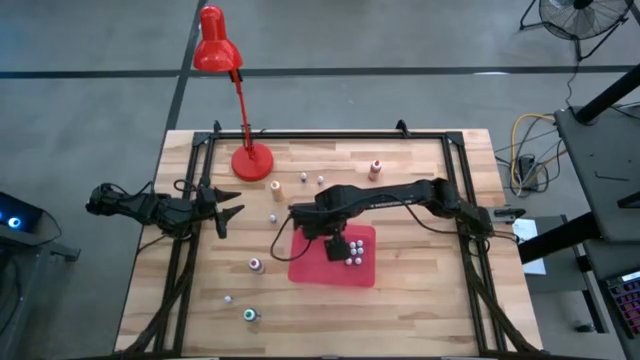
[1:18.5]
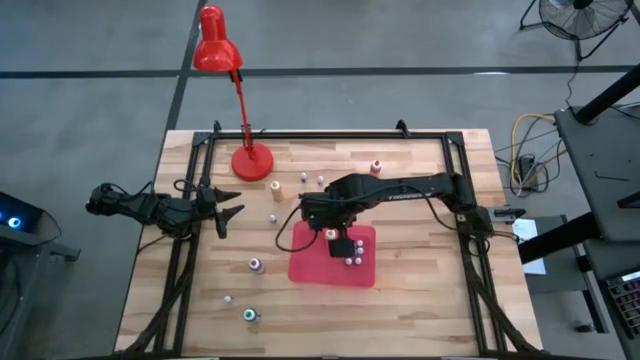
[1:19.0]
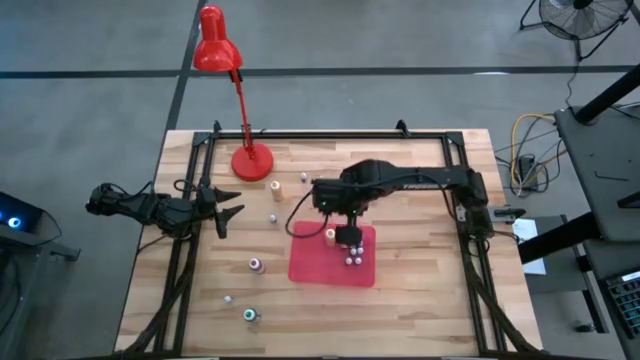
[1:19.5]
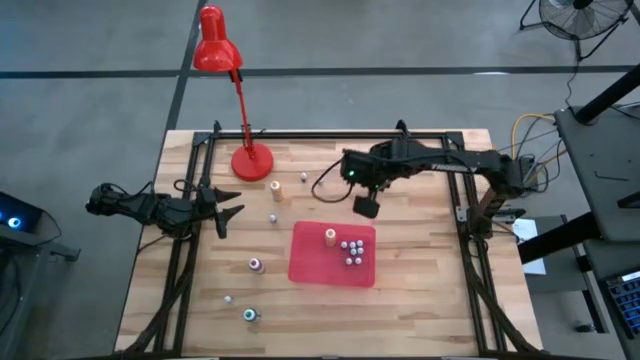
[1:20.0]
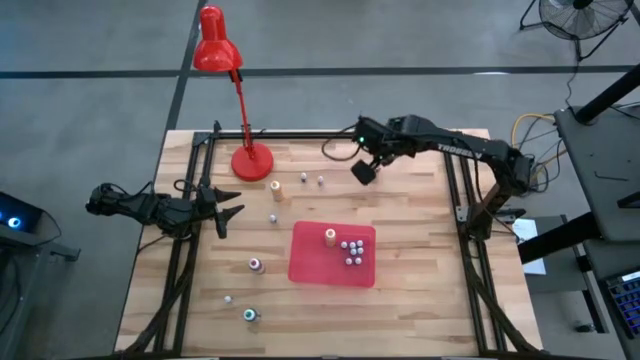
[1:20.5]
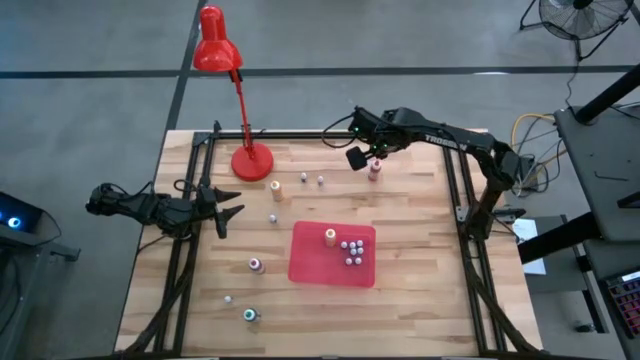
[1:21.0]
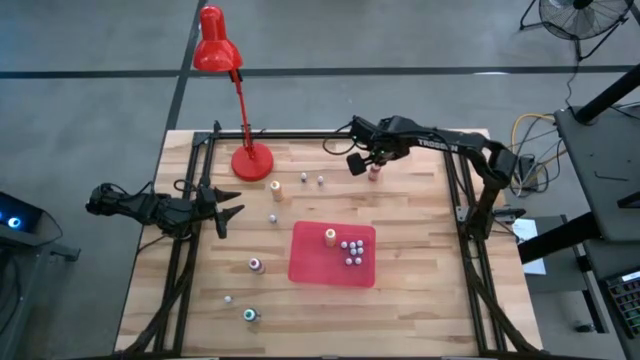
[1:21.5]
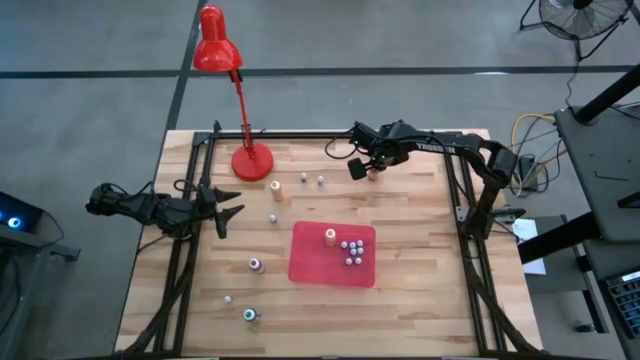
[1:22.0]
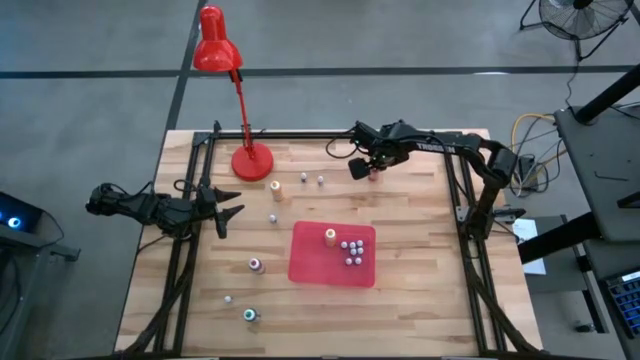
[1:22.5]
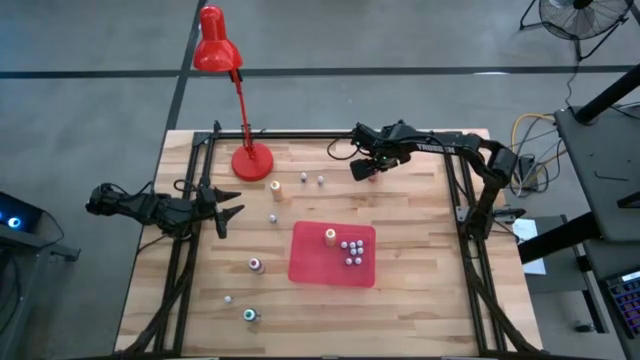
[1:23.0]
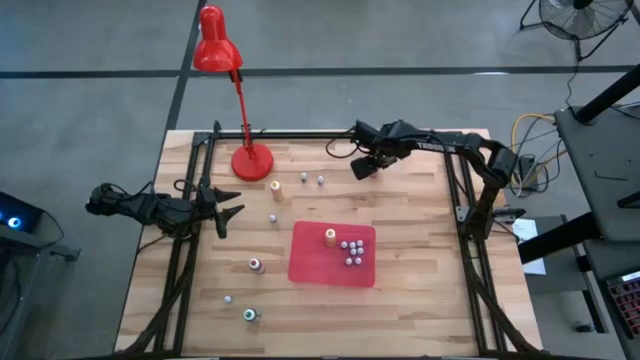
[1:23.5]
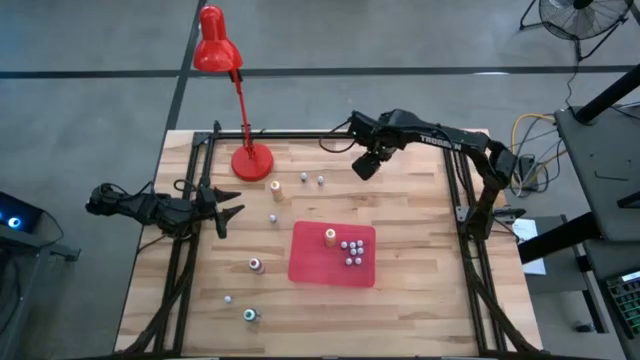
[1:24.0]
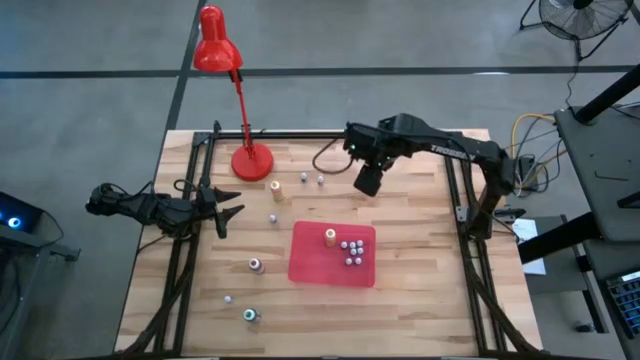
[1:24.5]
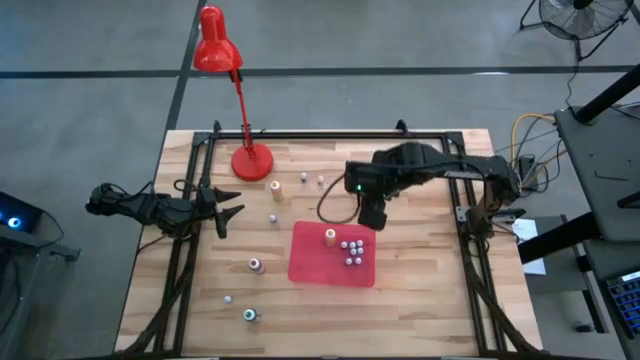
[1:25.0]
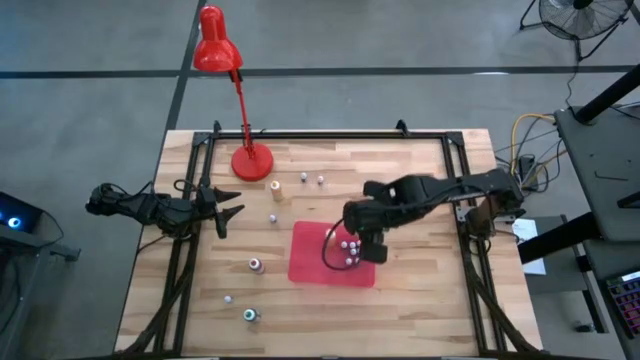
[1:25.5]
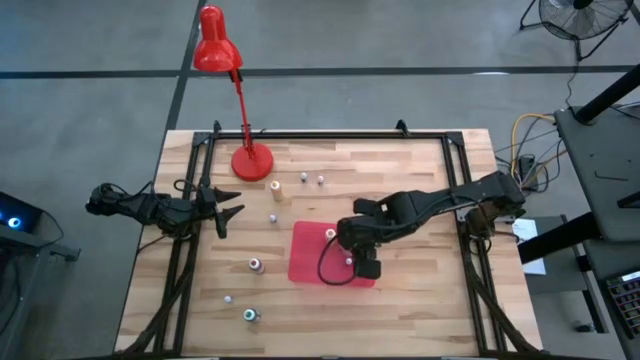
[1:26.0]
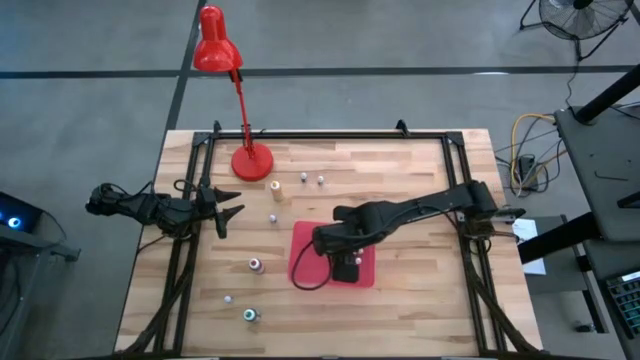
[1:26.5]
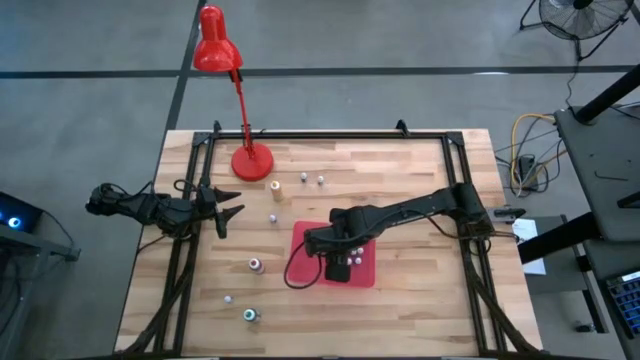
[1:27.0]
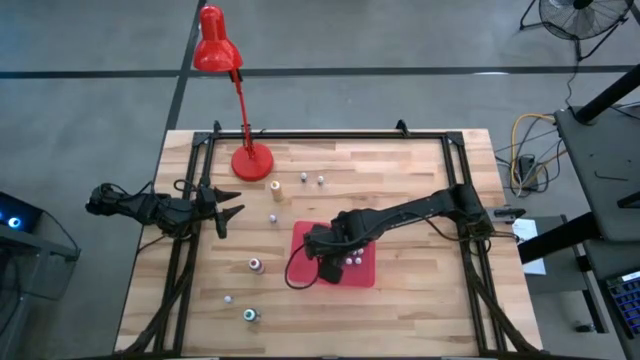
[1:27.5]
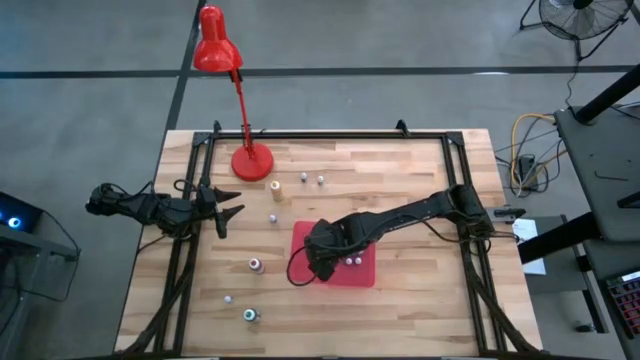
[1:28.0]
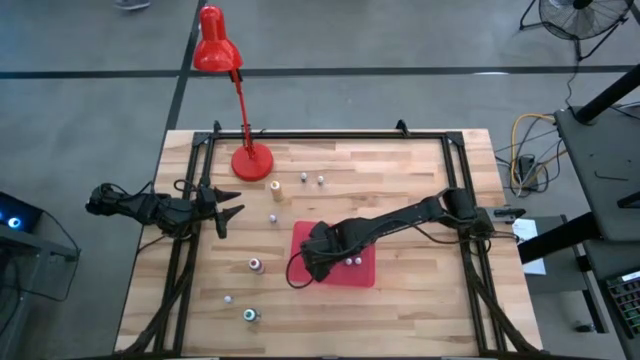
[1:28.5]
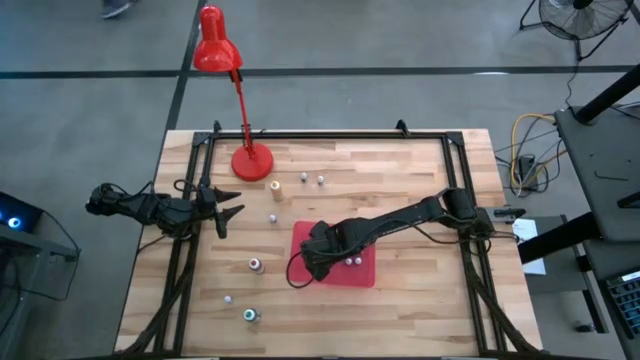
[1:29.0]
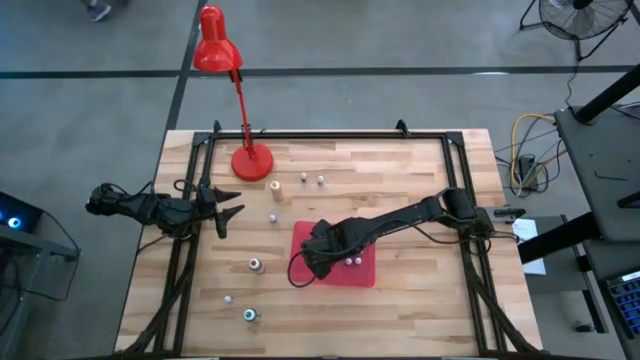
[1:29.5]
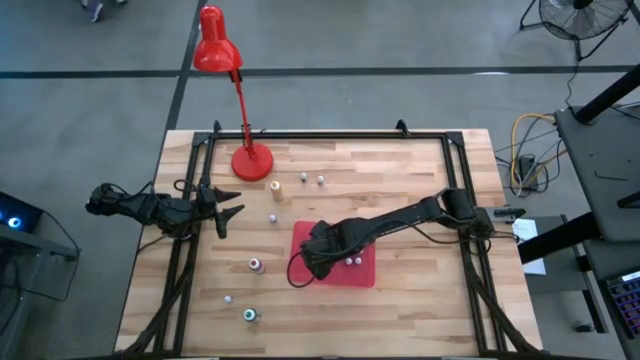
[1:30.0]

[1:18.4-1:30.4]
Task: Pick & Place food coloring
Put the large orange food coloring bottle in the red bin

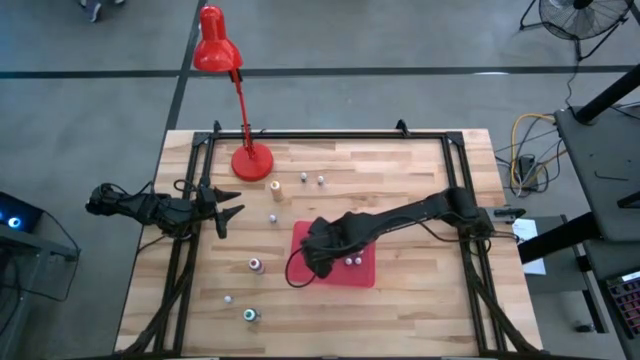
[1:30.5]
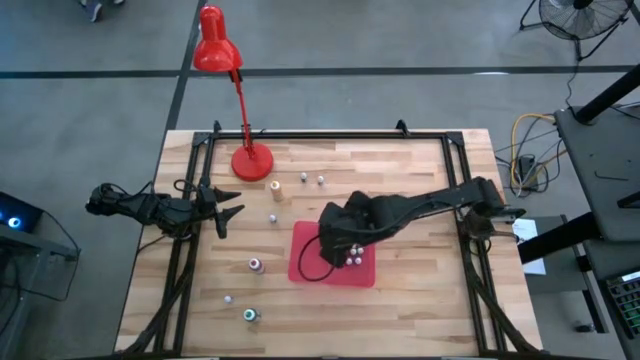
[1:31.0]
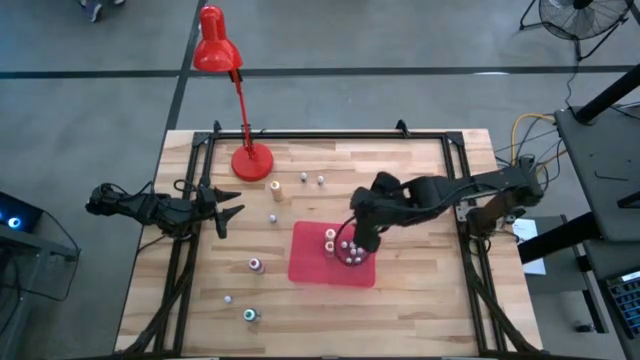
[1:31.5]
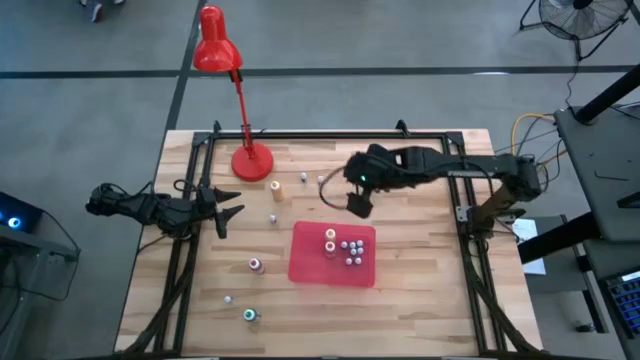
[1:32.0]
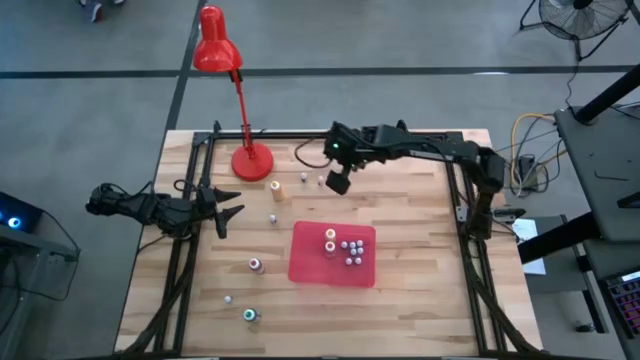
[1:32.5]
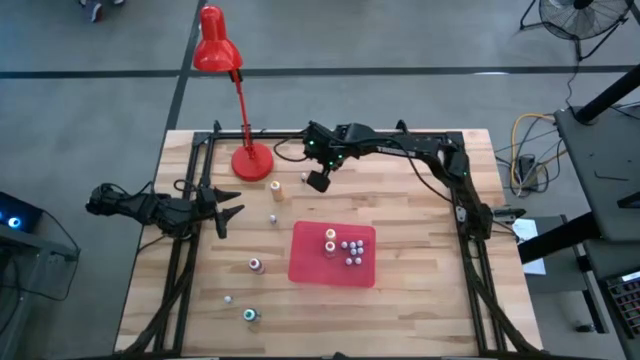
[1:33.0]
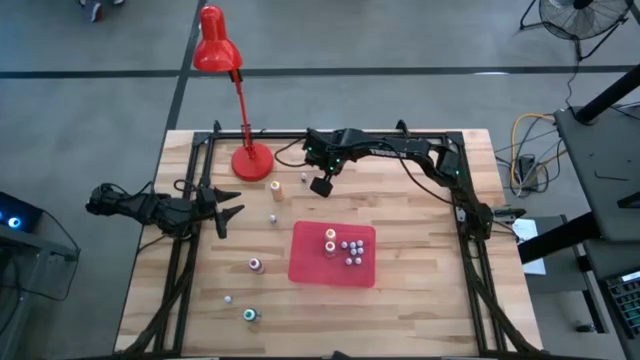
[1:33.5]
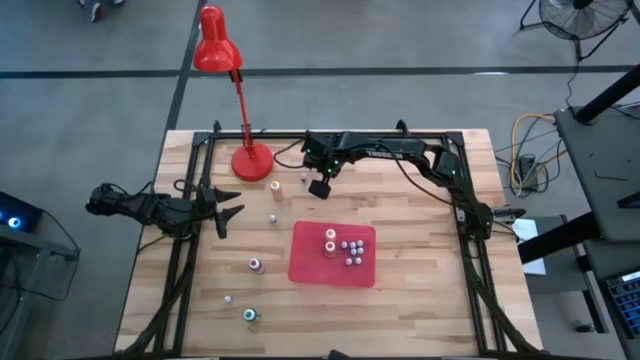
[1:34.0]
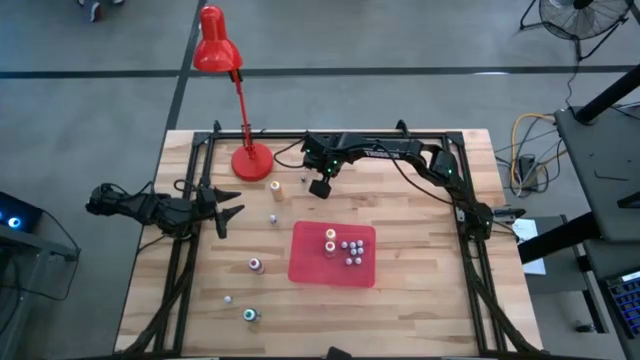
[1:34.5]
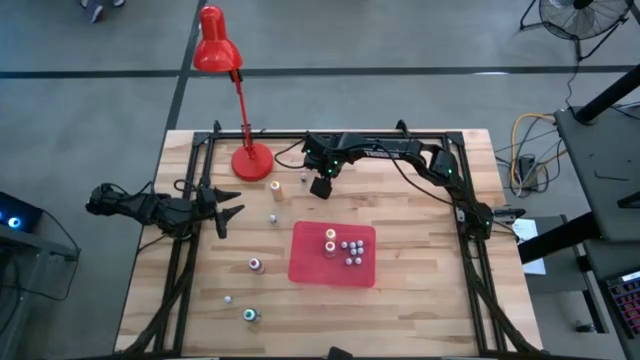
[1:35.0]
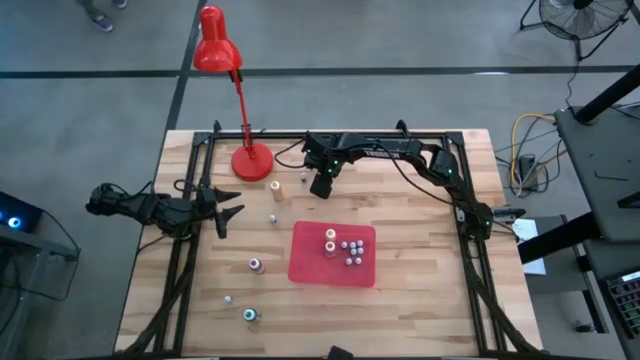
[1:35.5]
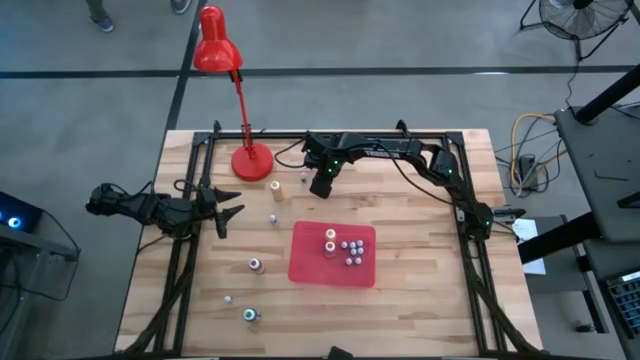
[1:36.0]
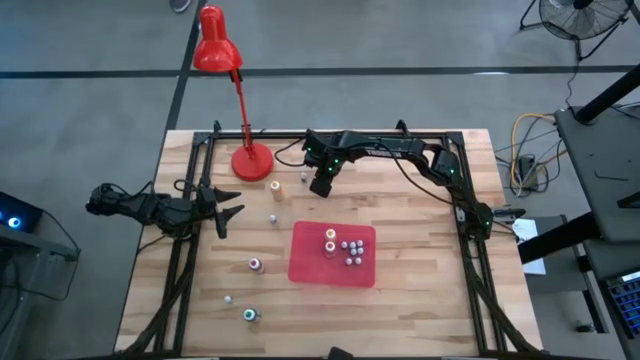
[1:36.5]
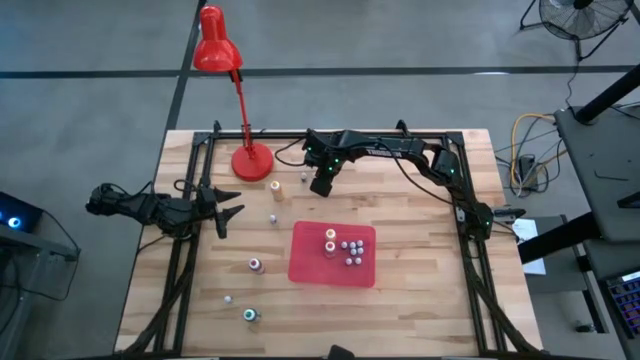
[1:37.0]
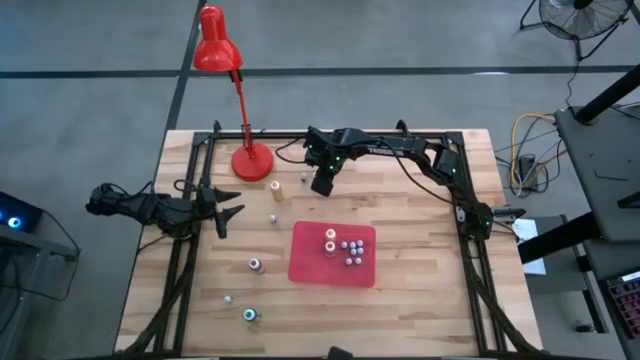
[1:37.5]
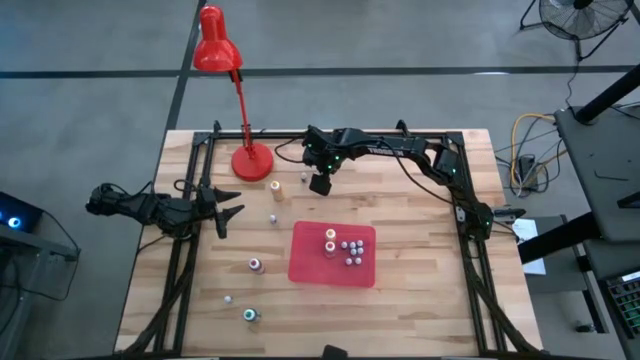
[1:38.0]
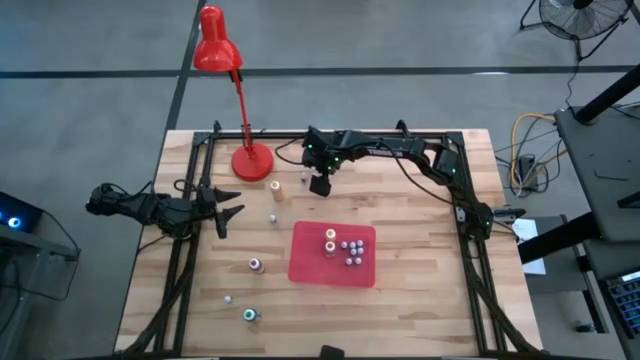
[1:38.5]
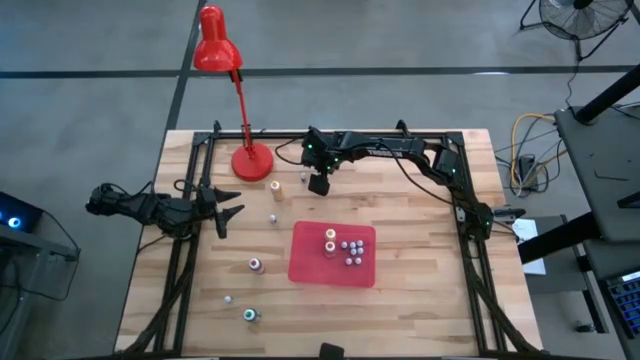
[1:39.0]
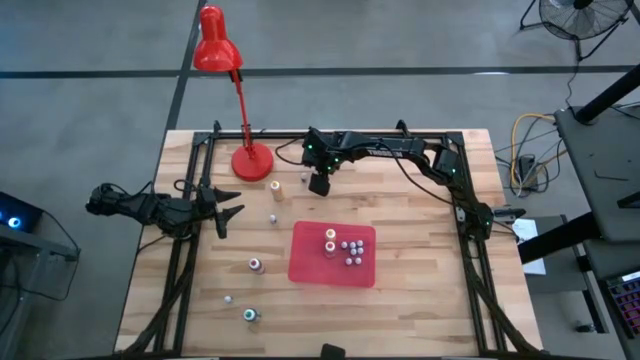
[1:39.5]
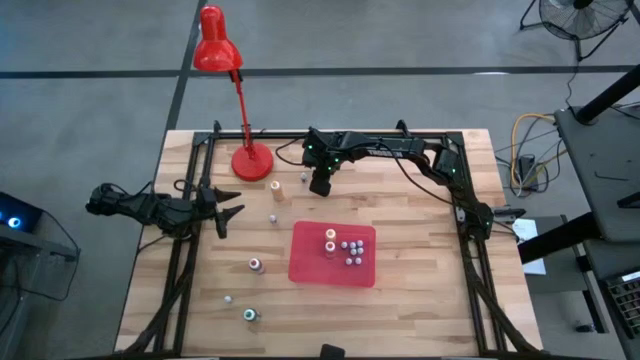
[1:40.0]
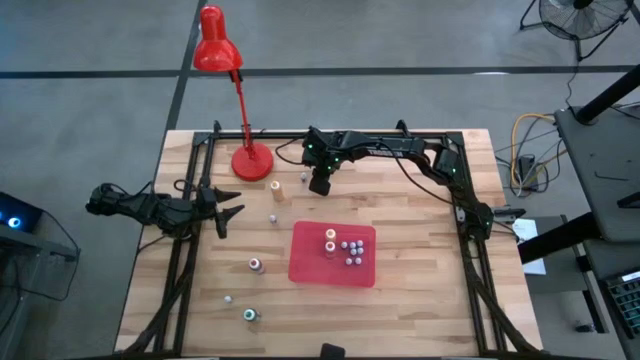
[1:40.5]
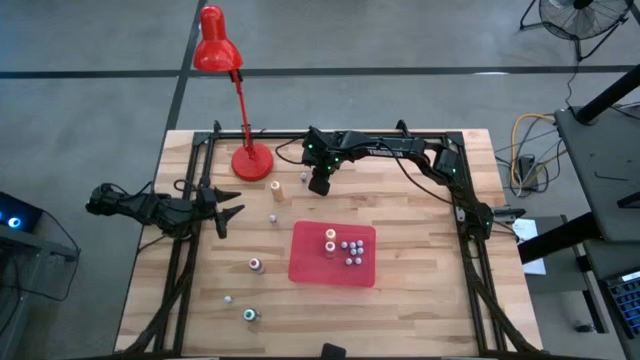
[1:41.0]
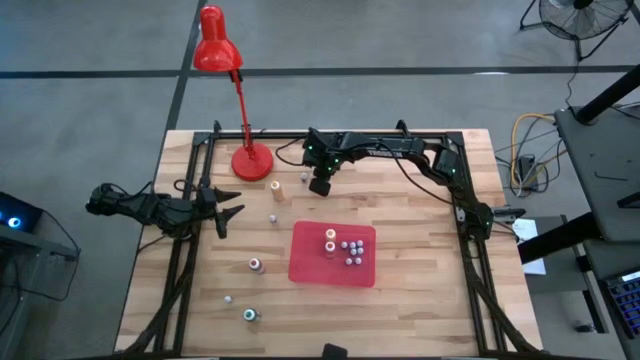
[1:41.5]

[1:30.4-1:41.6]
Put the top small red food coloring bottle in the red bin
